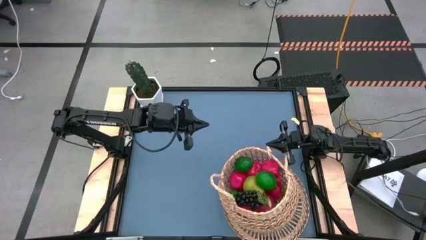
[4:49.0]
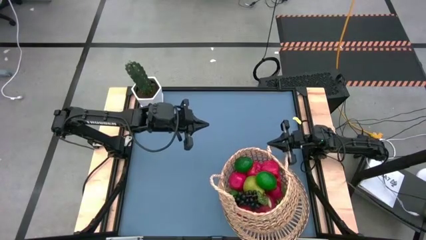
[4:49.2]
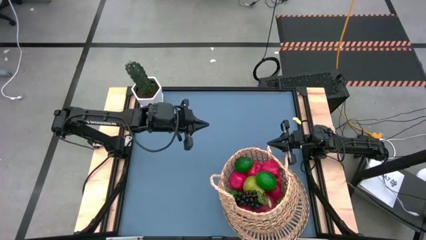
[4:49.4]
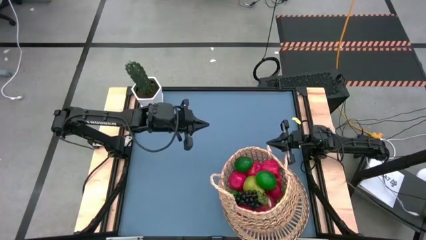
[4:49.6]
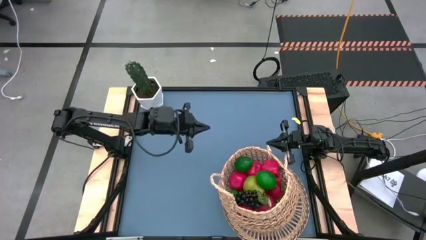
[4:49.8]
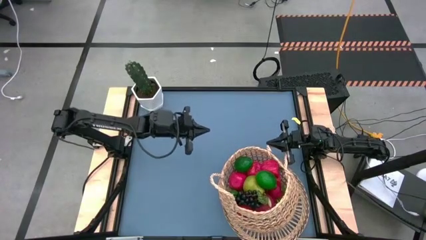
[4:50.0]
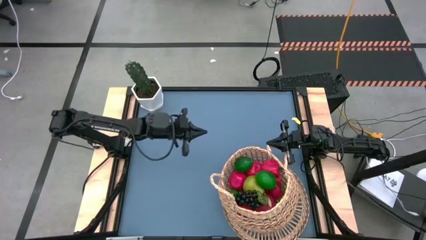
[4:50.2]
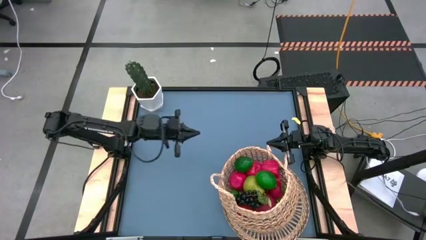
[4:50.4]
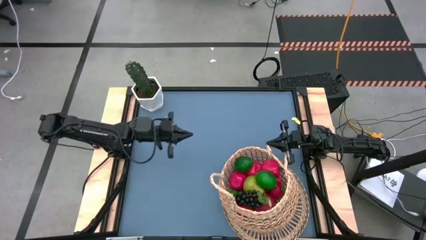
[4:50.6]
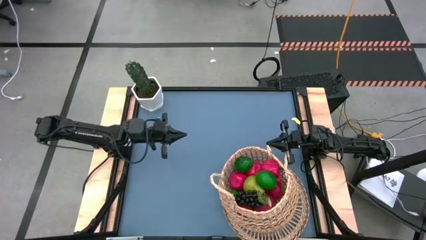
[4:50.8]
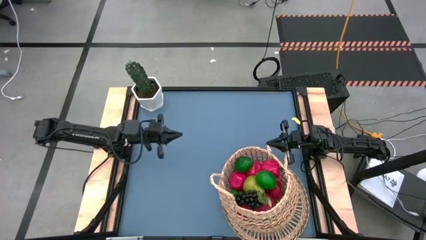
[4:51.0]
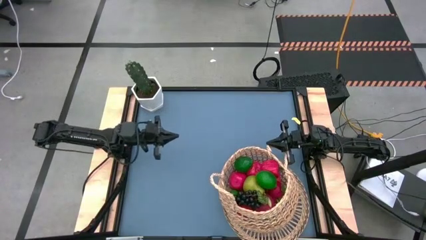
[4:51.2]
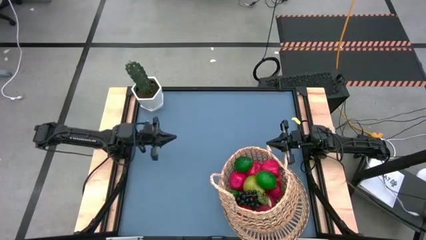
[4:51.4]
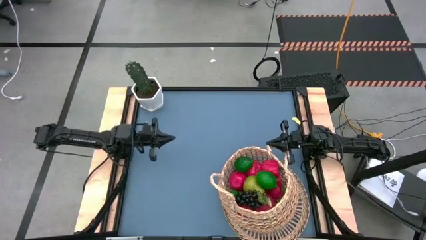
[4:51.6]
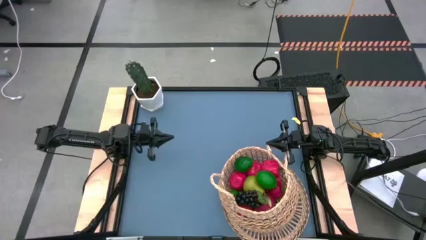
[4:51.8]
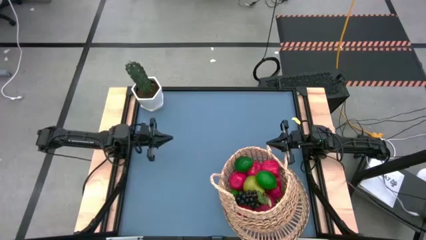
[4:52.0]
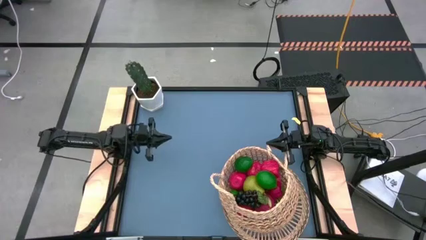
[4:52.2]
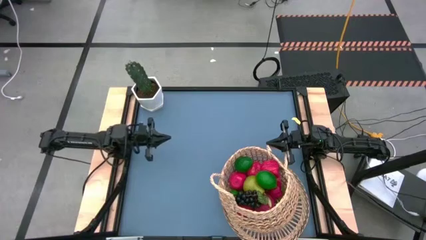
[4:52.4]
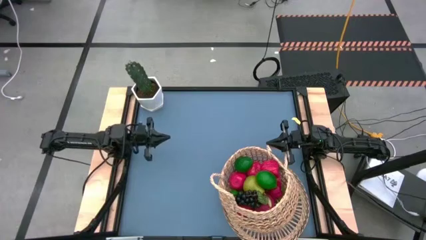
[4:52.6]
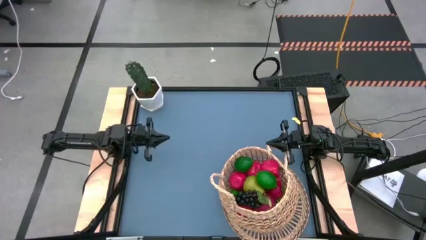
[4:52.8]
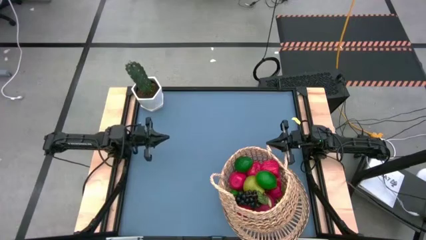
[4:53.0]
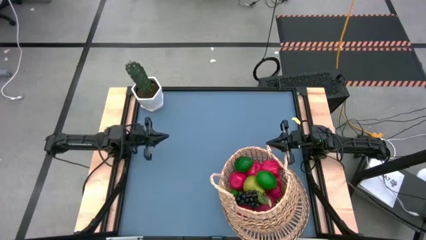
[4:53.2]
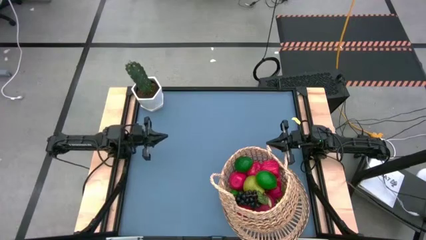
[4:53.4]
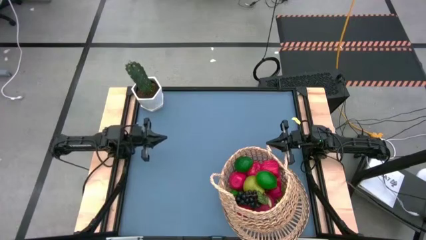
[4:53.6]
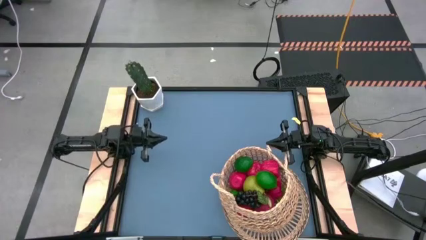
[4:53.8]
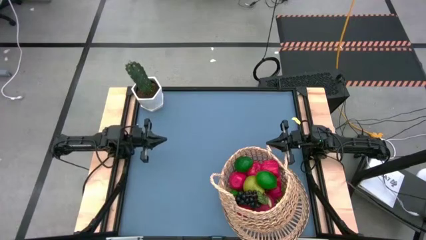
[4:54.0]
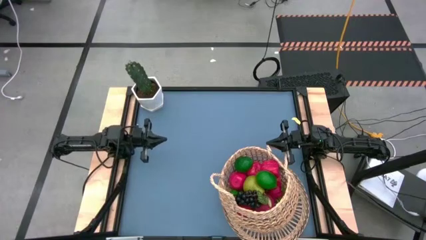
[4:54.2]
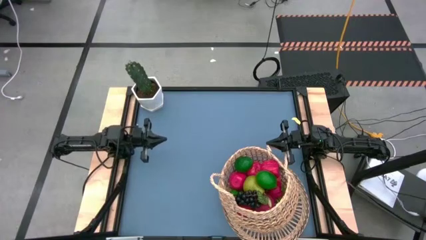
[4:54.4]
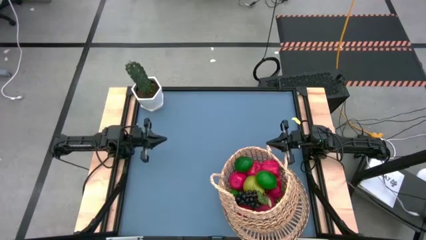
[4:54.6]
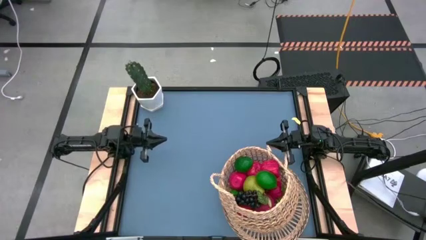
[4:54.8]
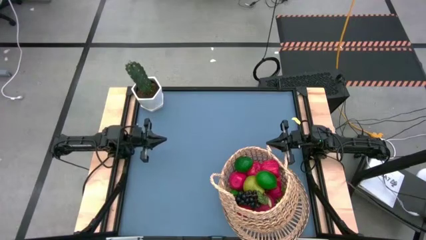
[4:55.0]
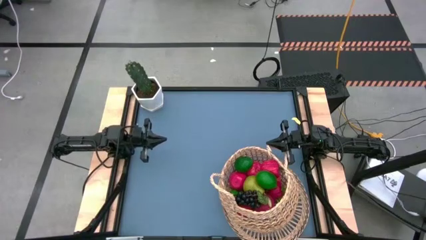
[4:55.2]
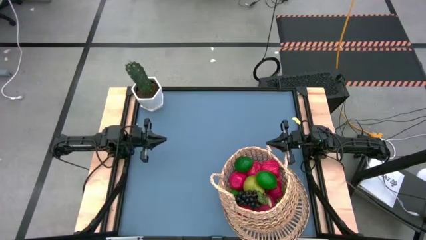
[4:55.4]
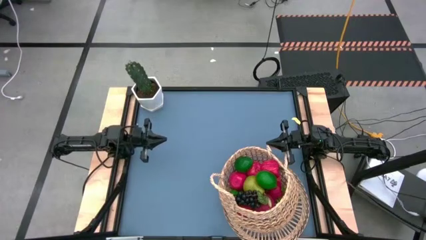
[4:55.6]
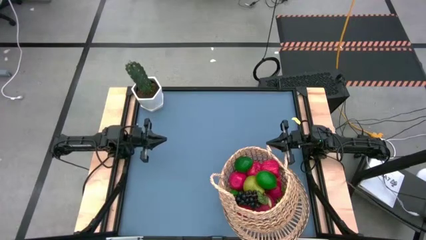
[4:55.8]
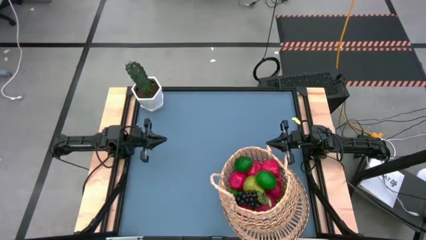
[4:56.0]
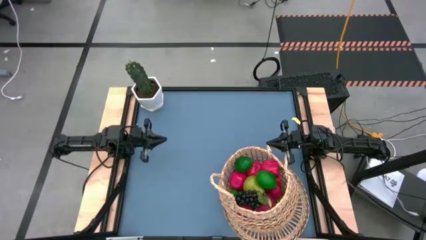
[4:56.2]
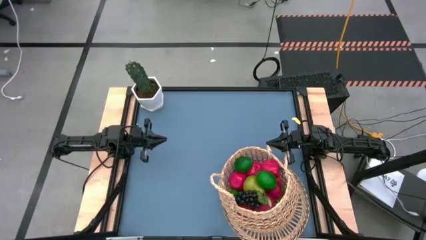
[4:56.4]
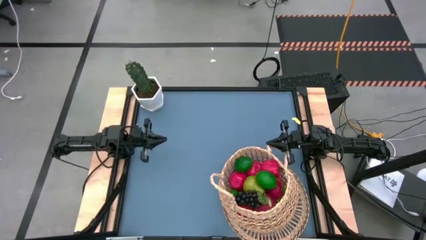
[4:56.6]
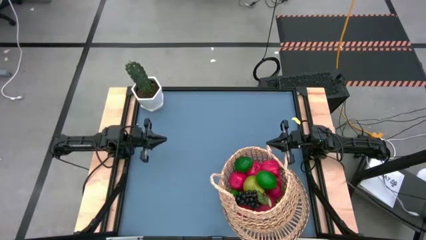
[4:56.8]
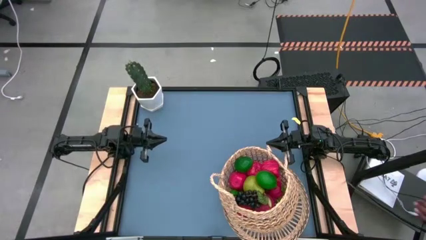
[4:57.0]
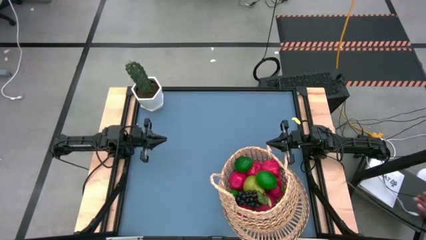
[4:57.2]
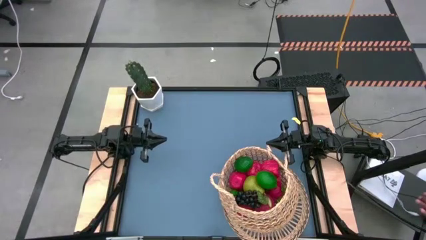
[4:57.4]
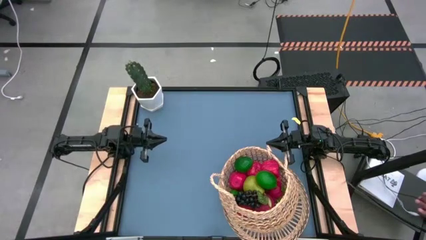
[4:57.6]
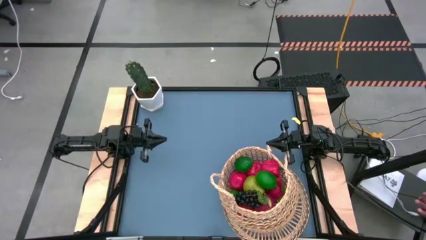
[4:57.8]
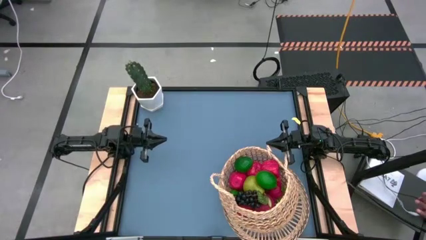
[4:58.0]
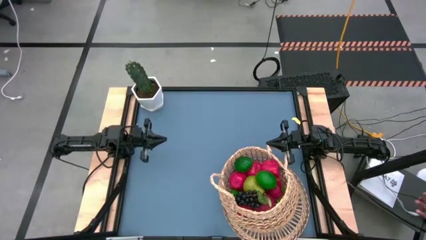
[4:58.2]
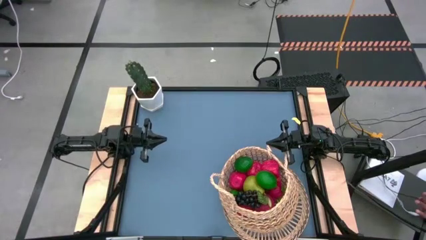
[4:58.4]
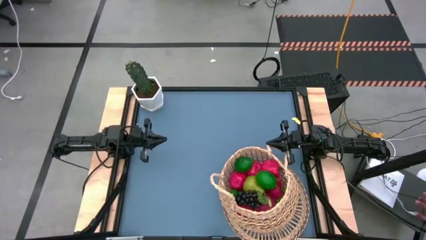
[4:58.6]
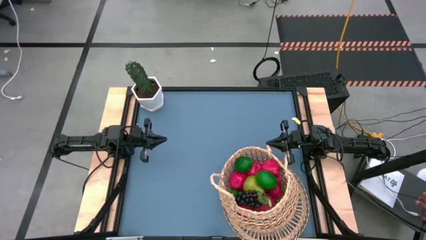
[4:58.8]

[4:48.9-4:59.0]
Task: Build produce basket
Return to Home Position

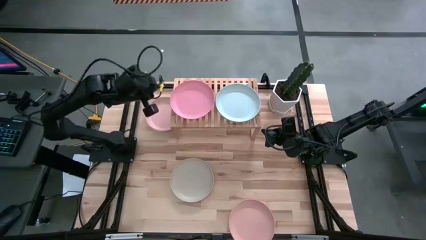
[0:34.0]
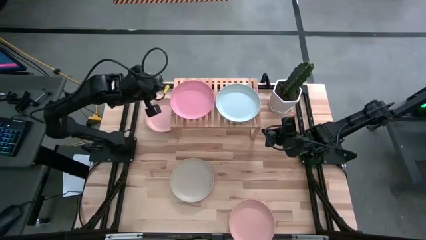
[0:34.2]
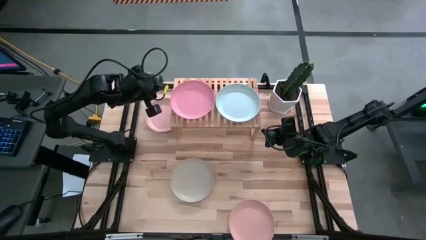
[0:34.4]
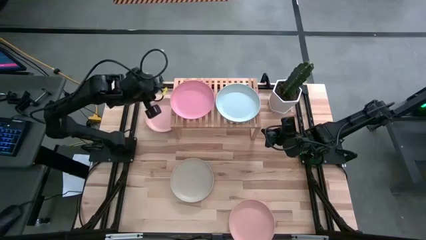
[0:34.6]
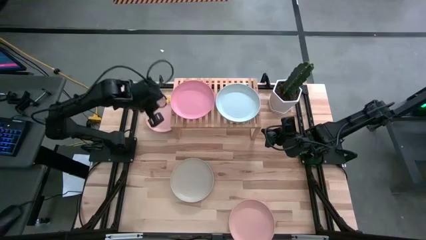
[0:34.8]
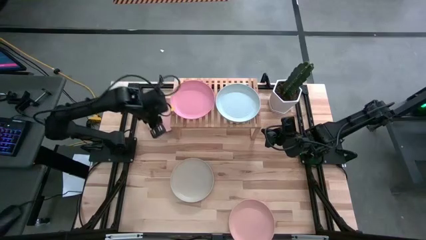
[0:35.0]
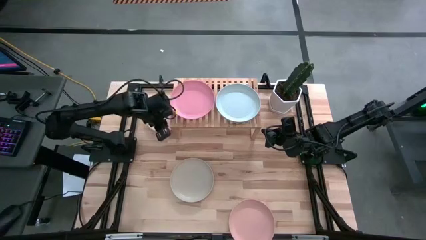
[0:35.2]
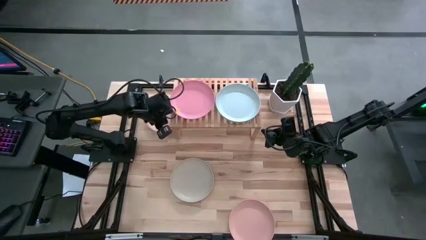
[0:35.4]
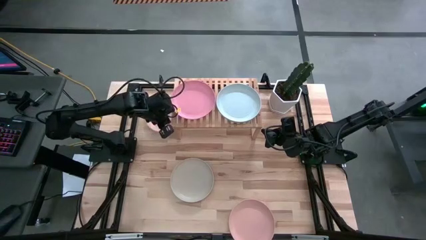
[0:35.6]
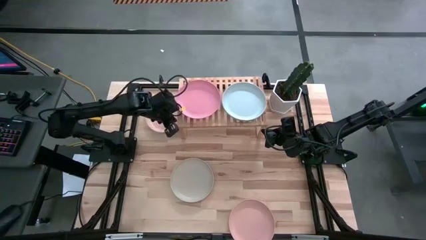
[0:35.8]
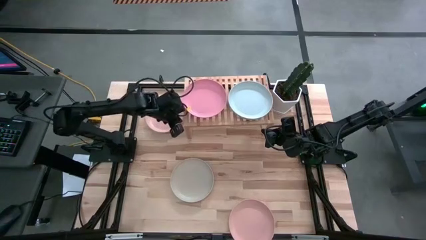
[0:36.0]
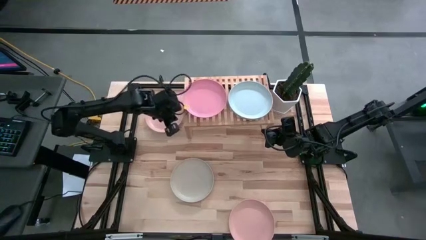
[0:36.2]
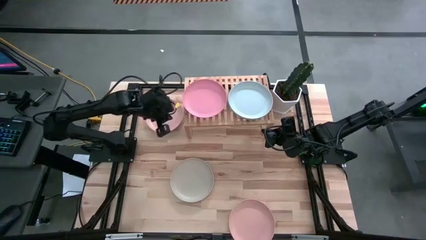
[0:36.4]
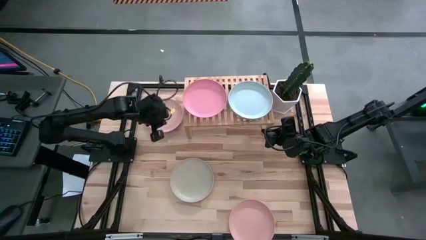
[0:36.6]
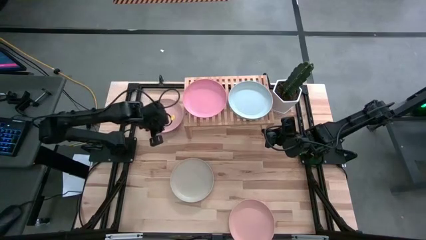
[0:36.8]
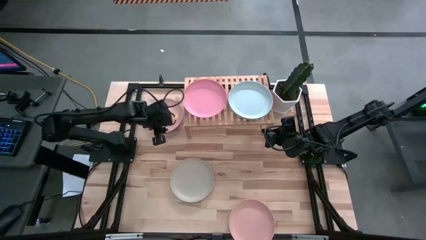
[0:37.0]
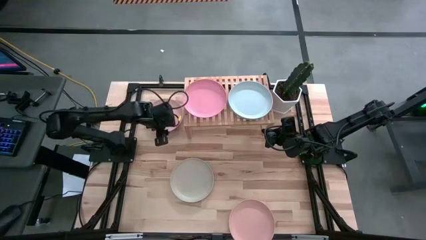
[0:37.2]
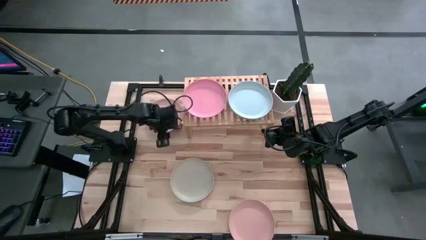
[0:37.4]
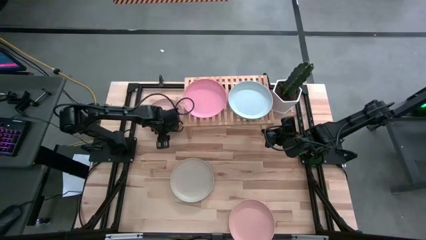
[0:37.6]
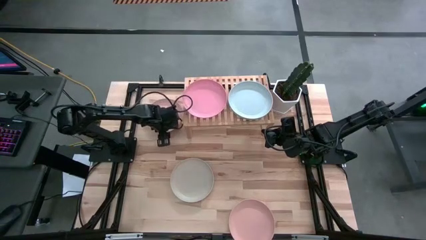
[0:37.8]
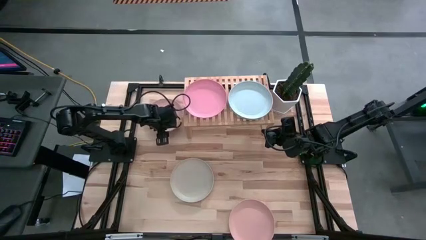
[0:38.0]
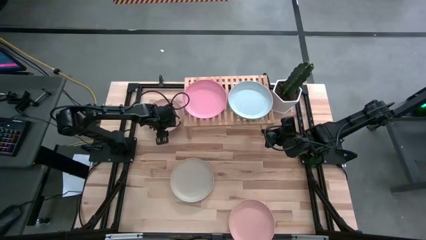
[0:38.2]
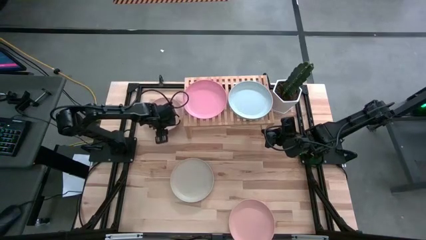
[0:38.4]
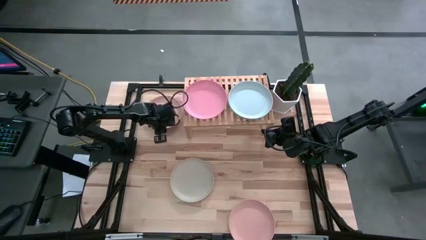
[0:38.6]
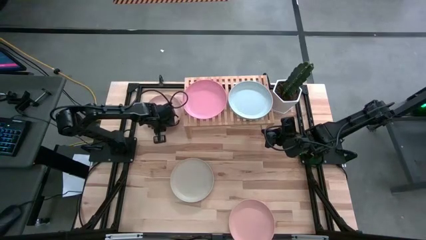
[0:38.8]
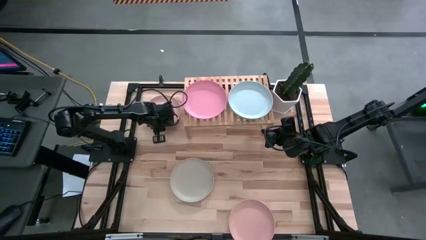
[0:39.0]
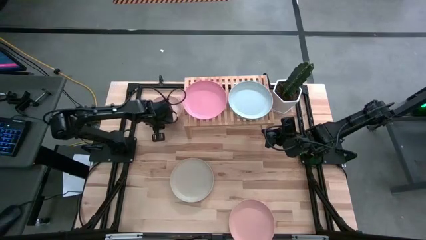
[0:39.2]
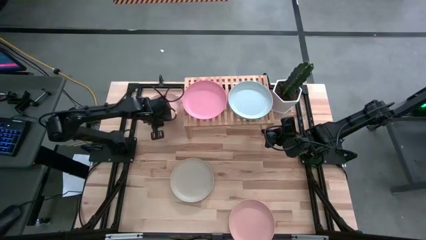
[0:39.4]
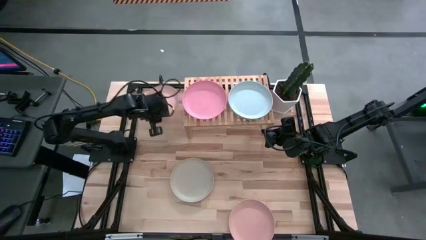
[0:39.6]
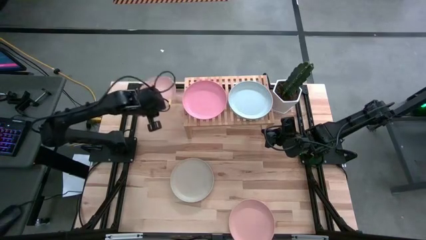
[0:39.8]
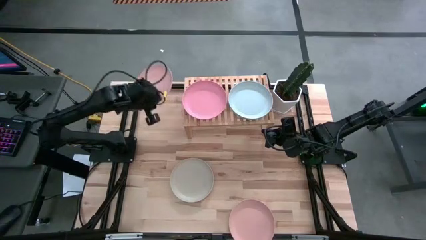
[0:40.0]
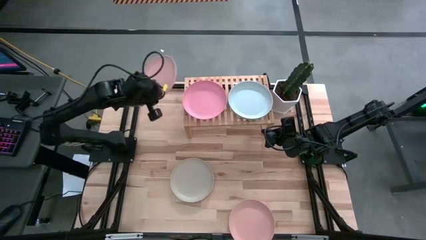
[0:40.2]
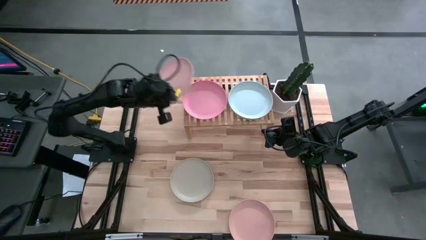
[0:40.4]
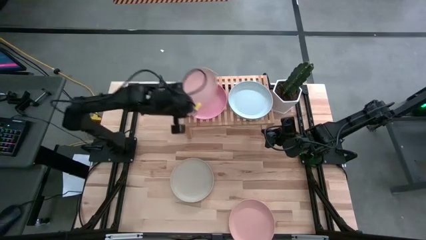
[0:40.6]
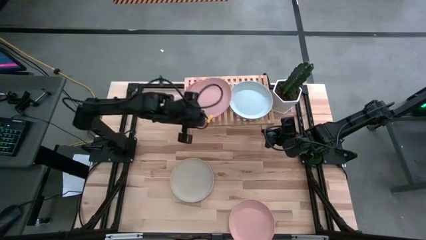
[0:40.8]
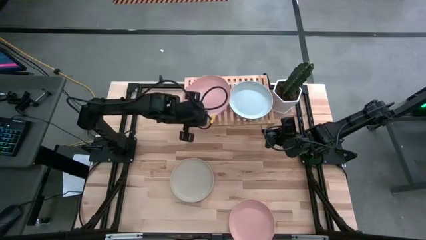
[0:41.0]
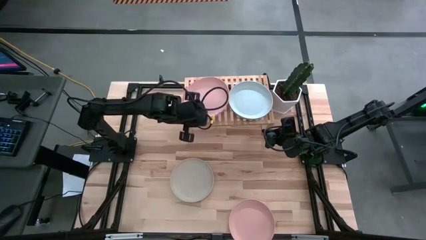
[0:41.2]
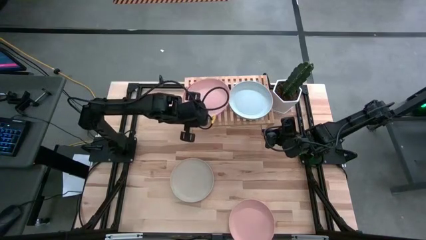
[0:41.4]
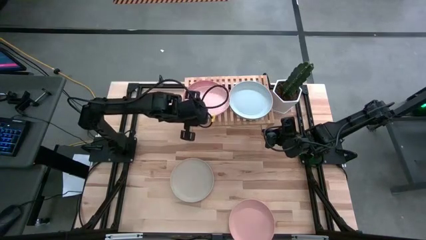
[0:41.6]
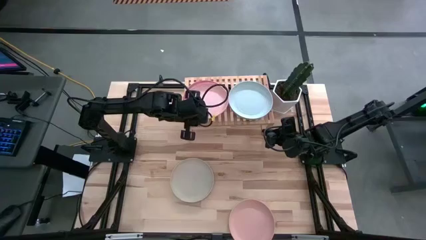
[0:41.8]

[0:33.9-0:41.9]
Task: Place and stack plates onto a shelf
Stack the top pink plate on top of the other pink plate on the shelf
